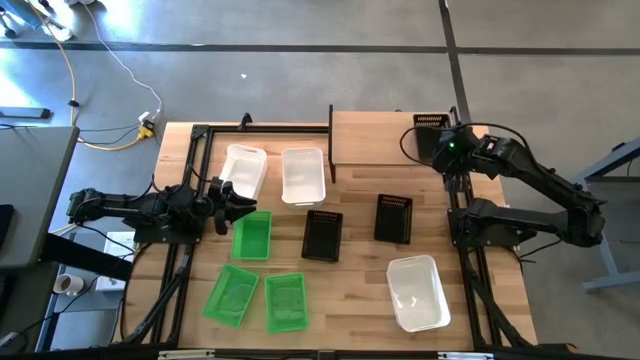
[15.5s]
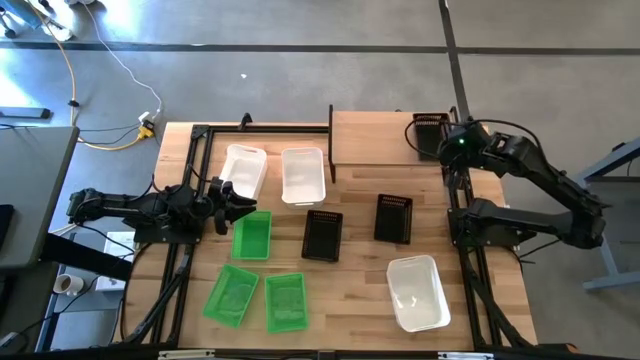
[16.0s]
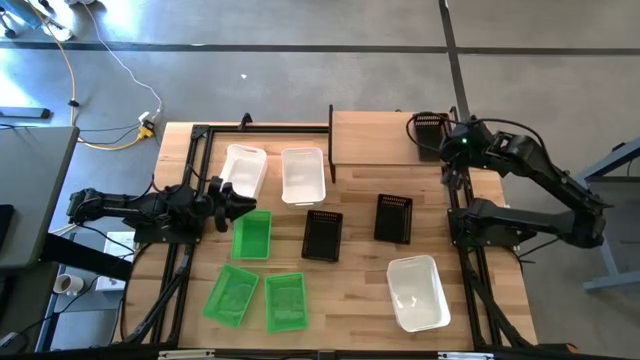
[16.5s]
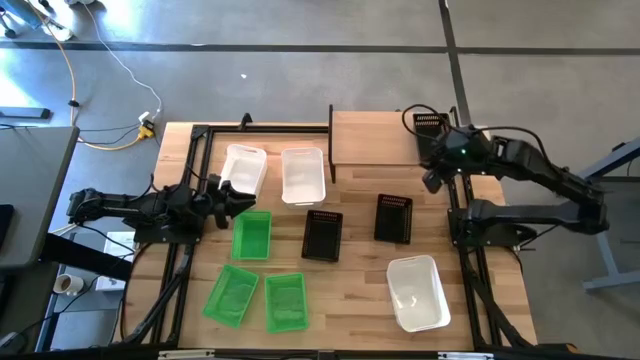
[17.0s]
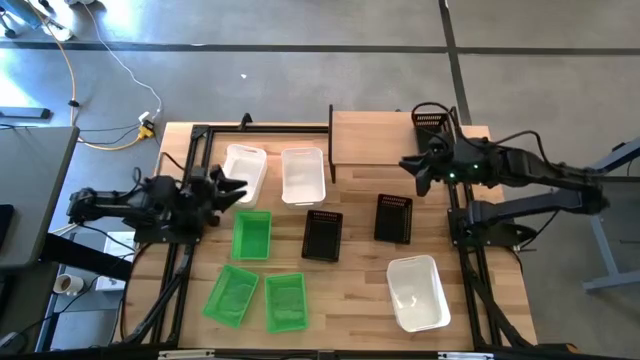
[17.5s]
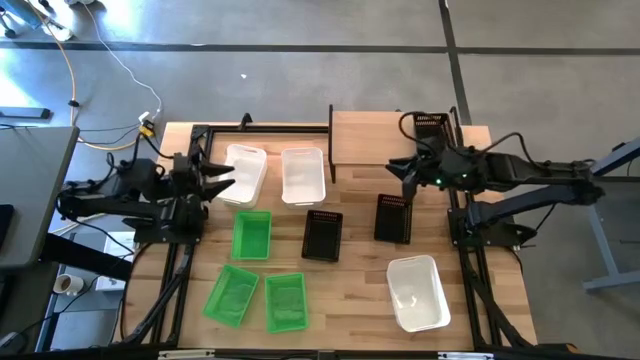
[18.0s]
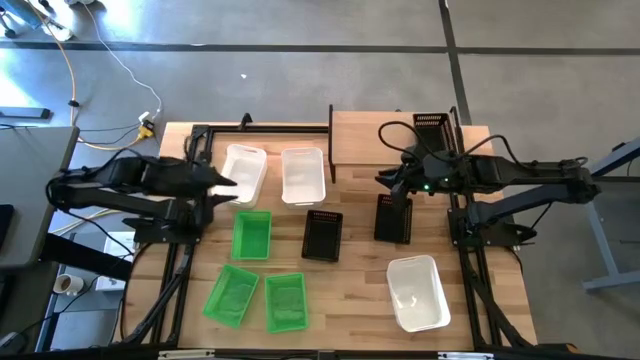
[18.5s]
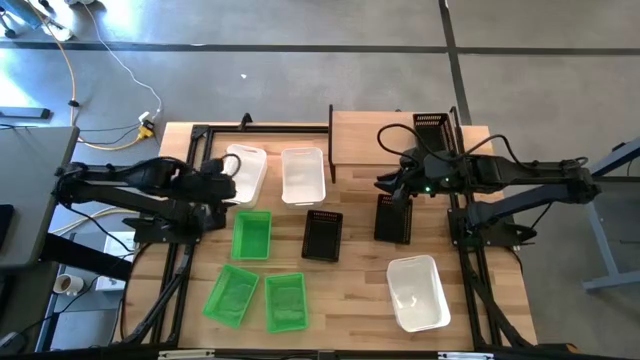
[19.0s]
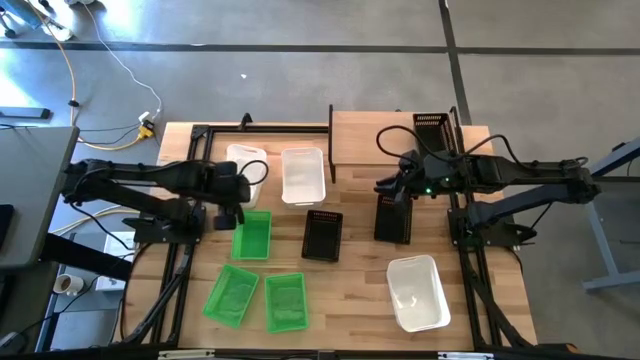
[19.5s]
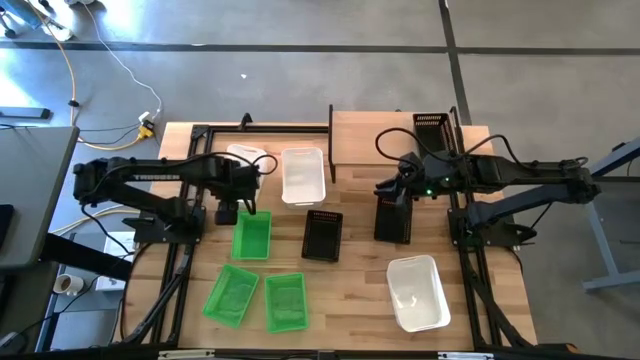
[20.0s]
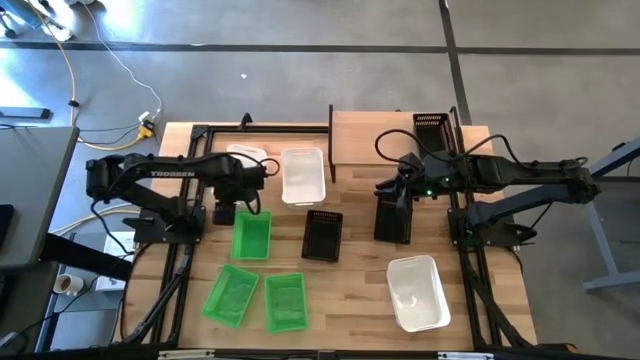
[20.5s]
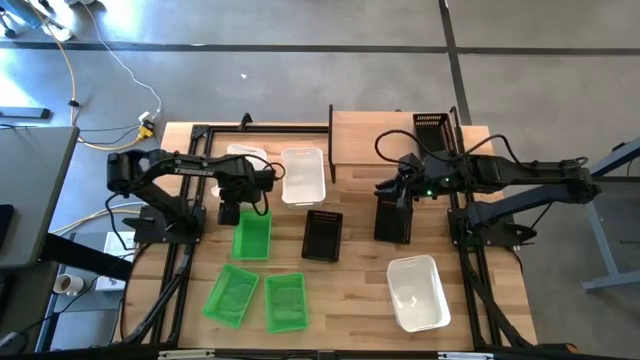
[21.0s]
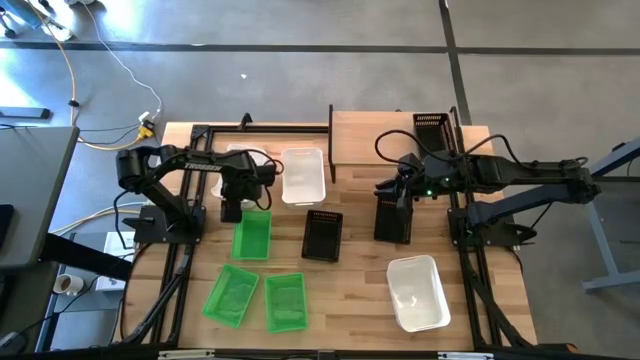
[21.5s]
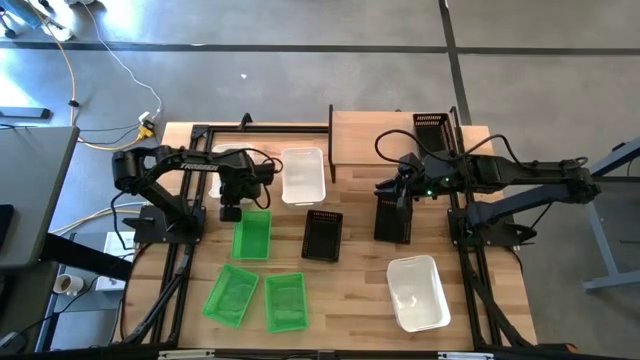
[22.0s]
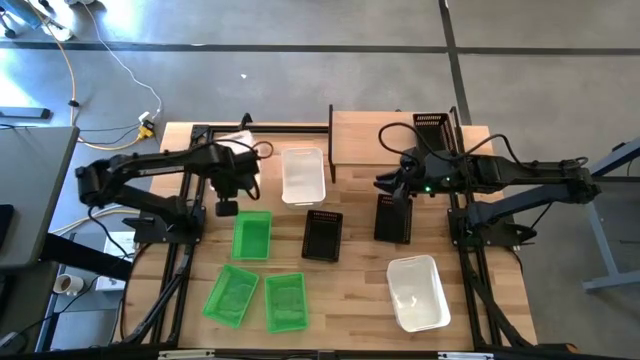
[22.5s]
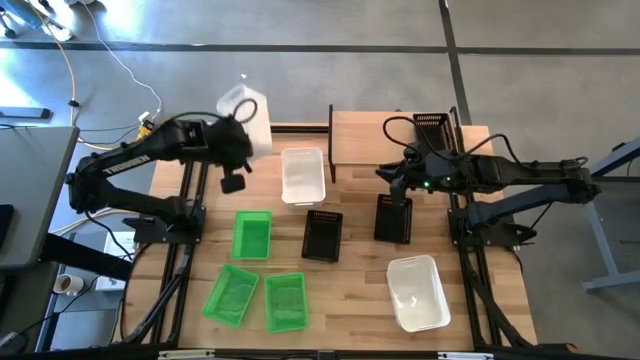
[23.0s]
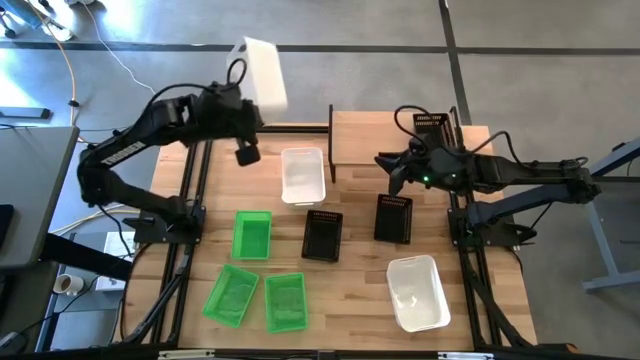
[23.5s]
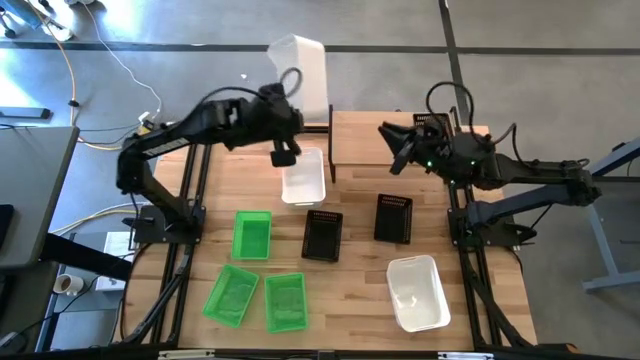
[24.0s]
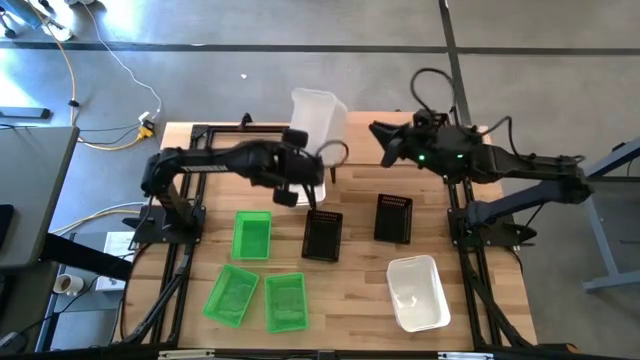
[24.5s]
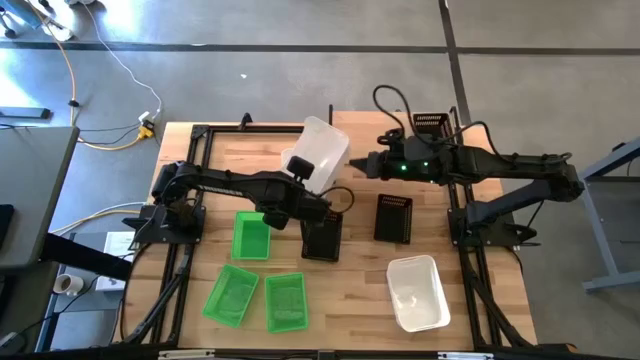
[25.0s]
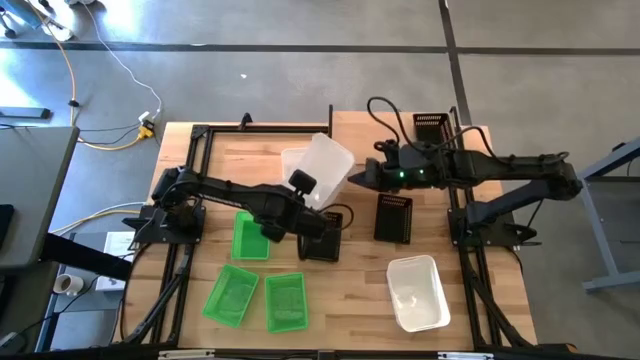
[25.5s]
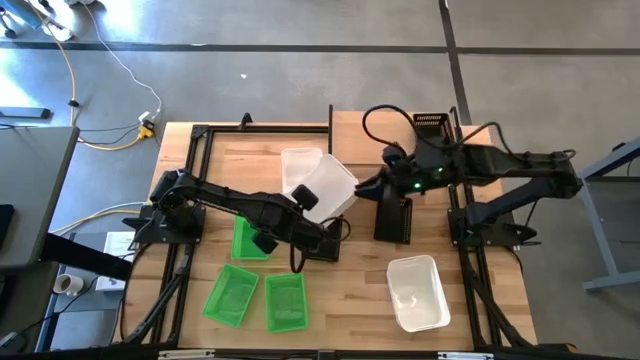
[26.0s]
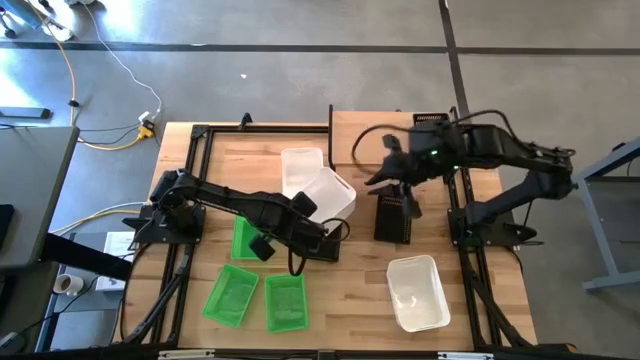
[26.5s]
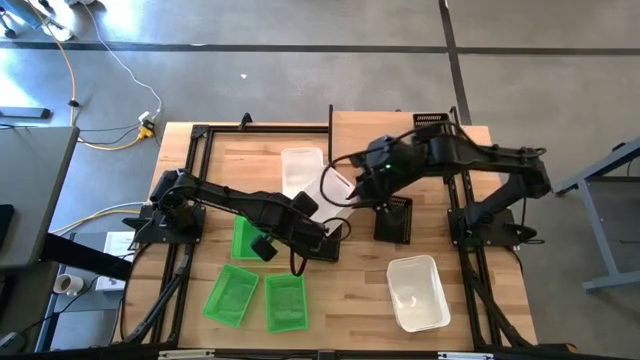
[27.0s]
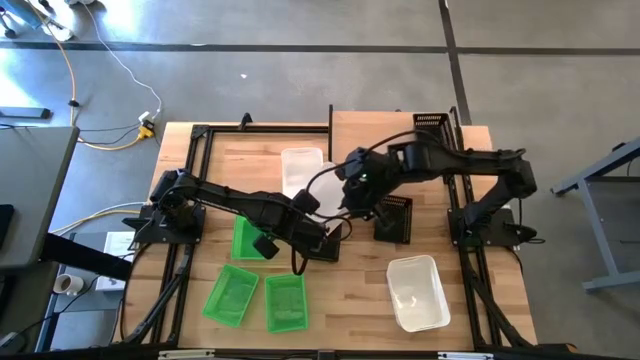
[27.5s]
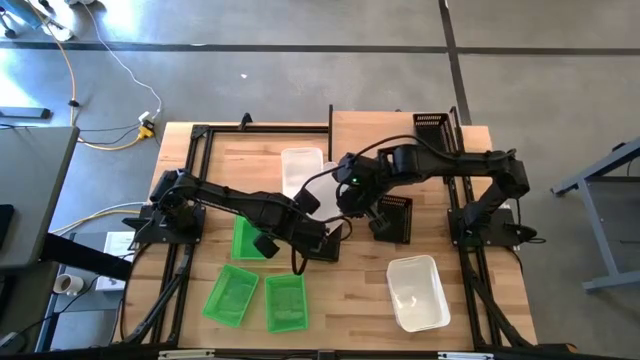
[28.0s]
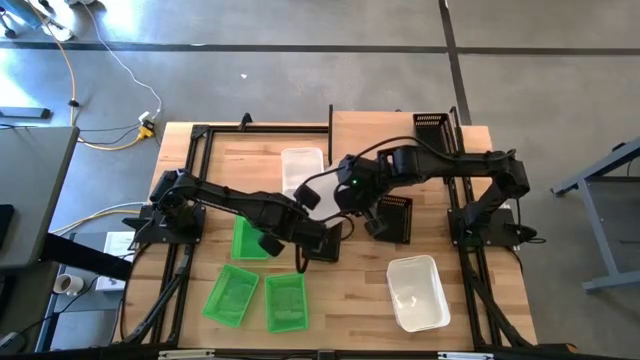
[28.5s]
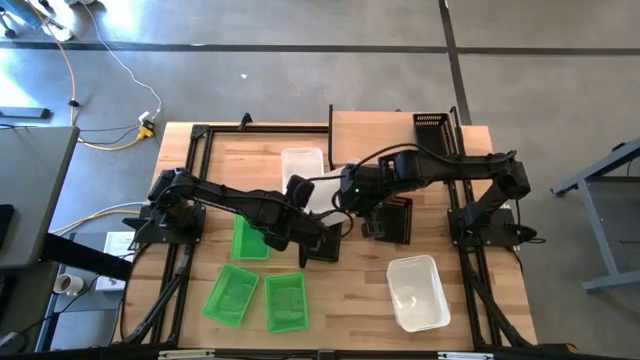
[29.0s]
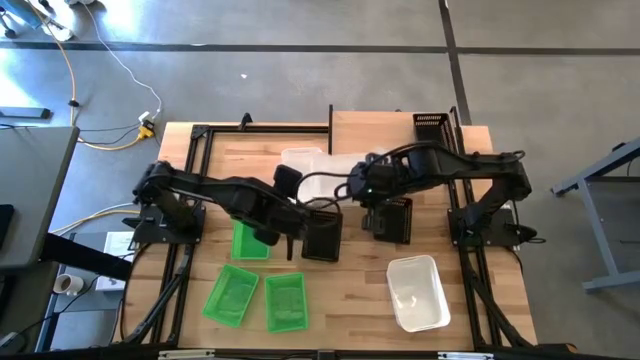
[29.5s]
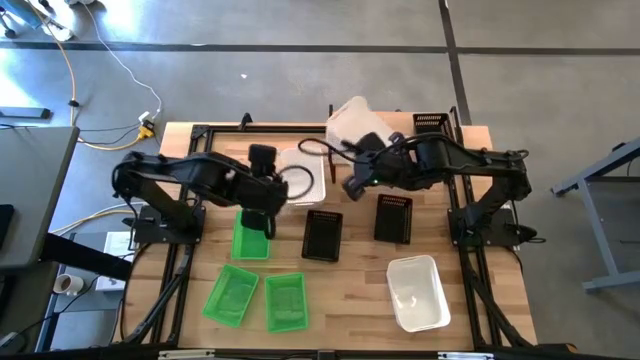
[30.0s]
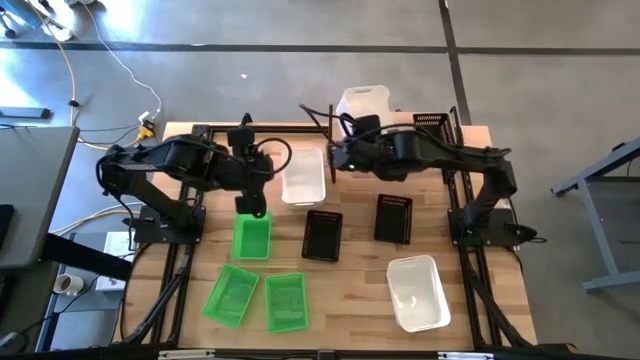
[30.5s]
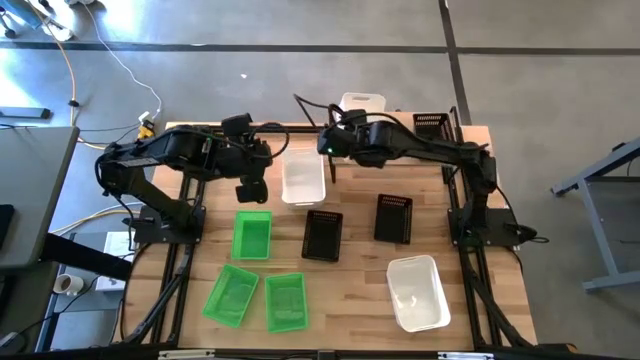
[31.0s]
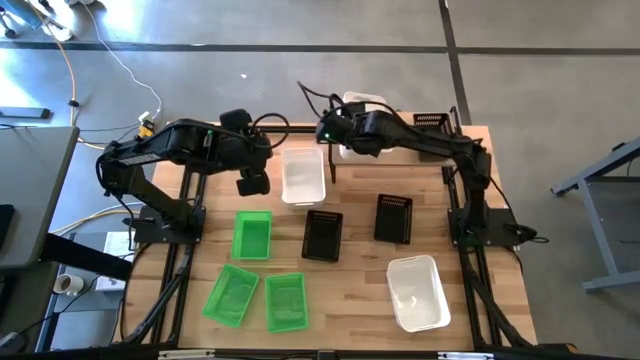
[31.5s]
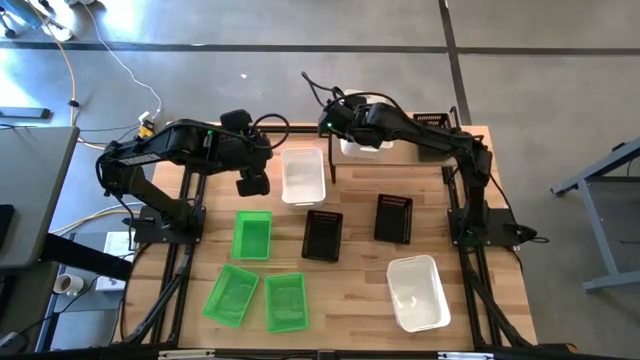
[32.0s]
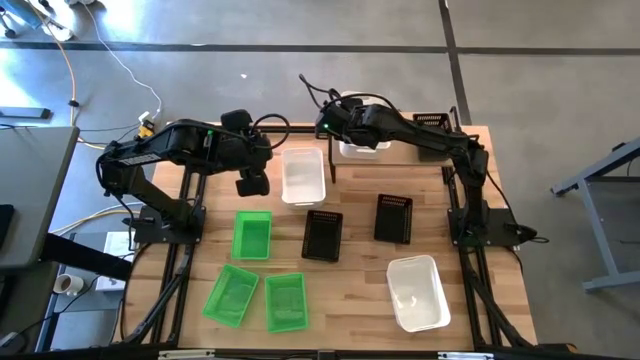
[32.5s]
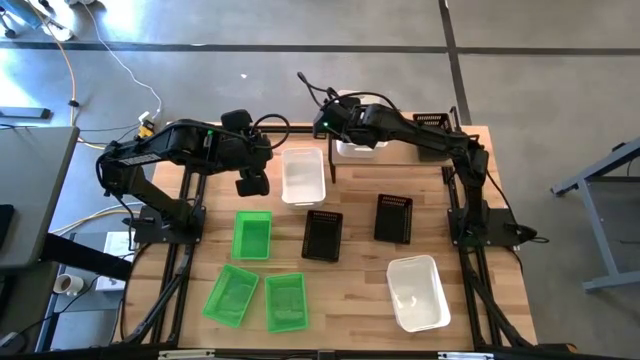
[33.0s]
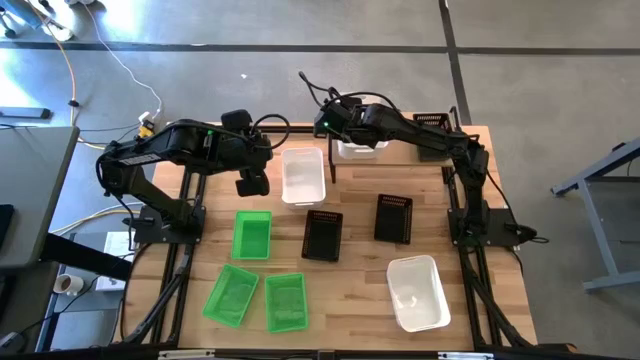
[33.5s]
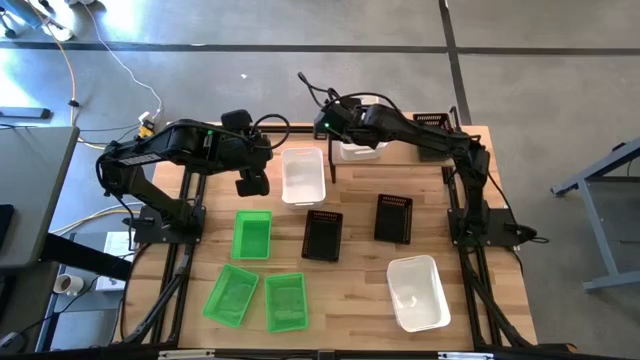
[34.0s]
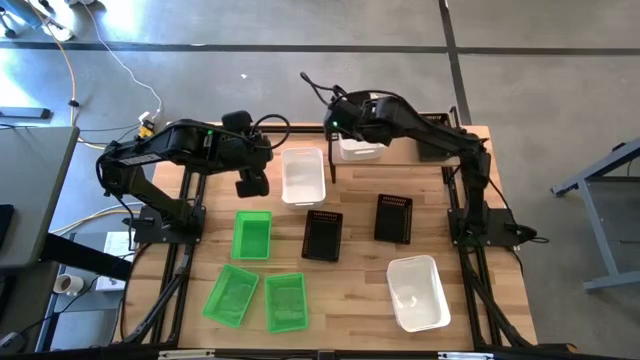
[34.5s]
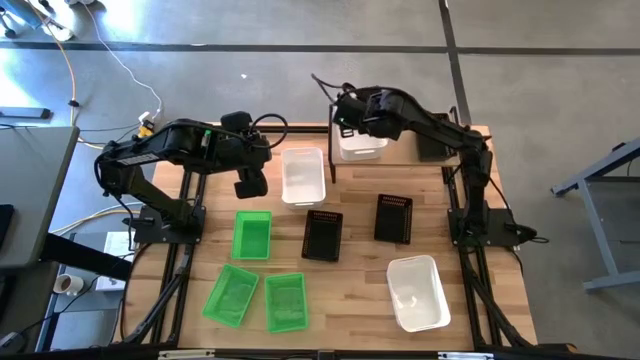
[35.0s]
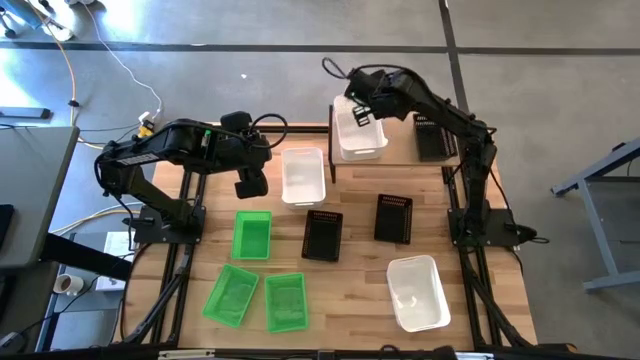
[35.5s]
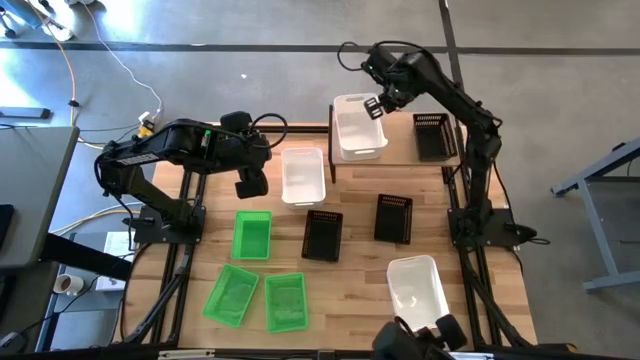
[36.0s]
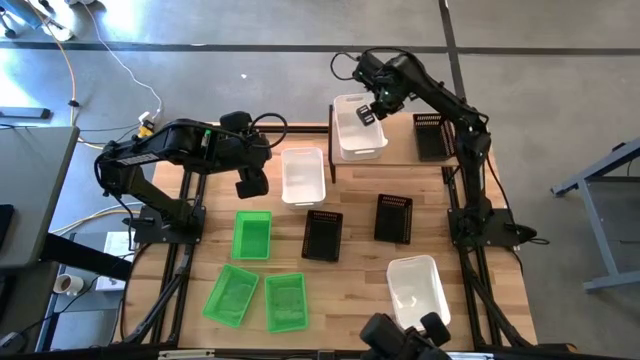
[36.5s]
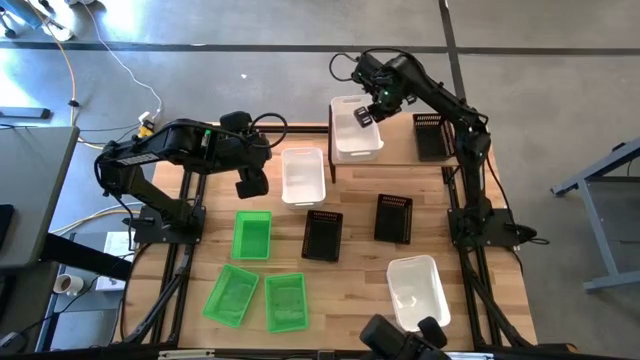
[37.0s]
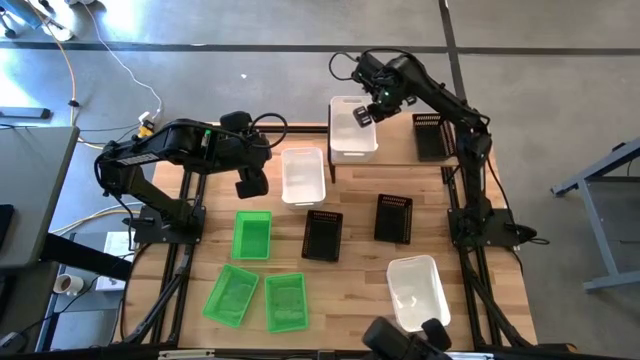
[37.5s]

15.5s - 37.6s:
Task: Stack baskets on shelf by color
Put the top left white bin on the shelf
